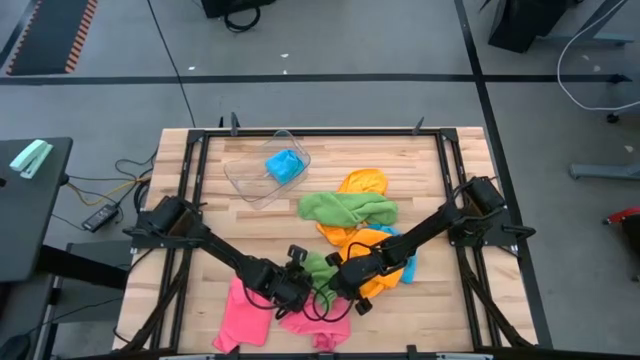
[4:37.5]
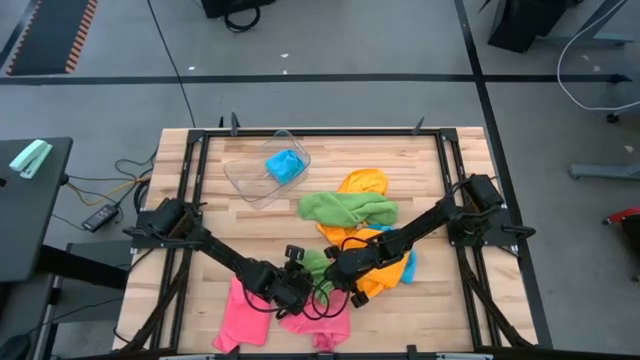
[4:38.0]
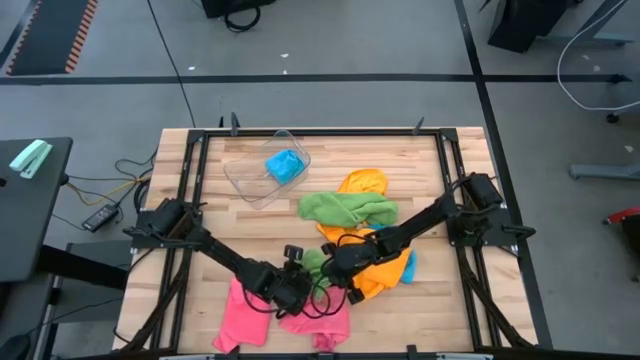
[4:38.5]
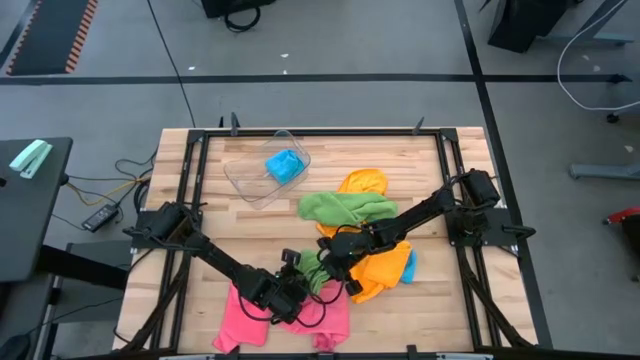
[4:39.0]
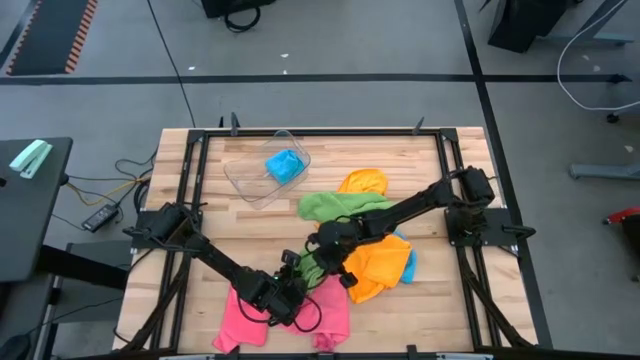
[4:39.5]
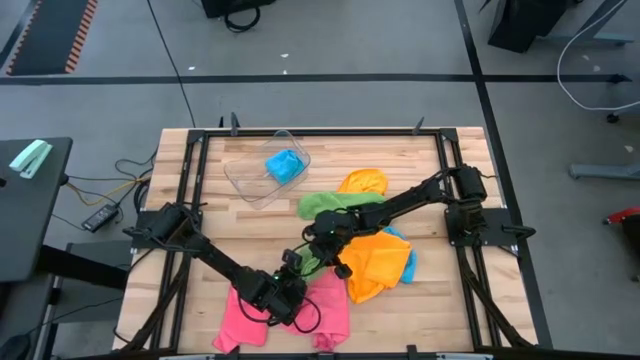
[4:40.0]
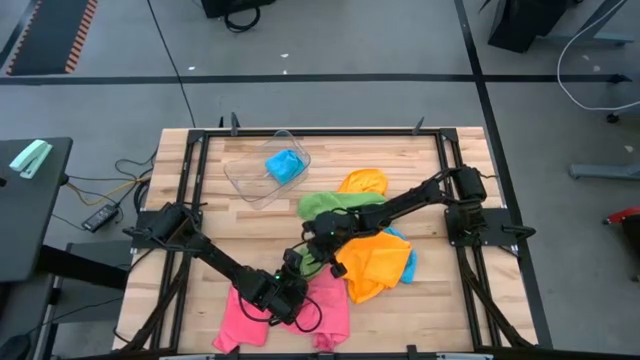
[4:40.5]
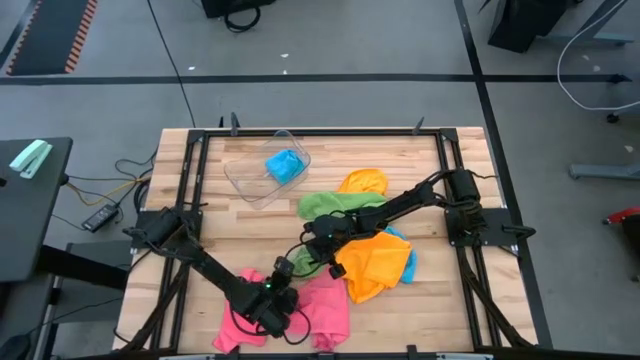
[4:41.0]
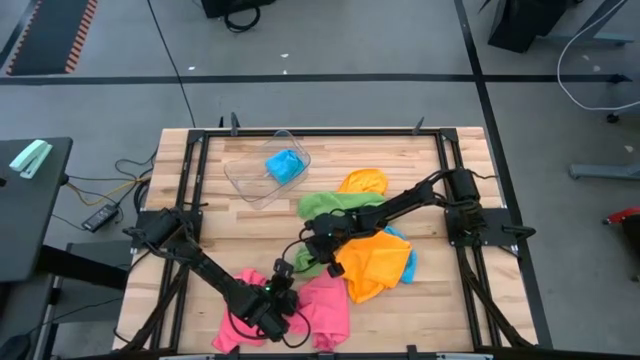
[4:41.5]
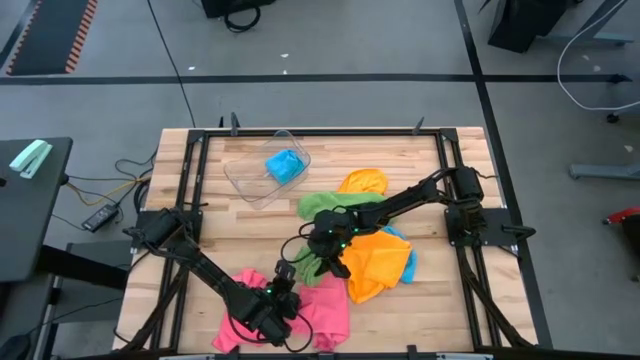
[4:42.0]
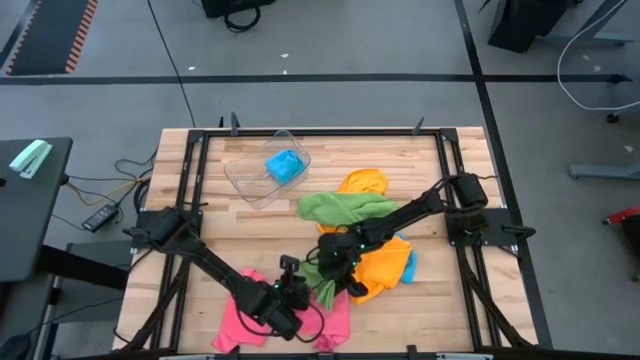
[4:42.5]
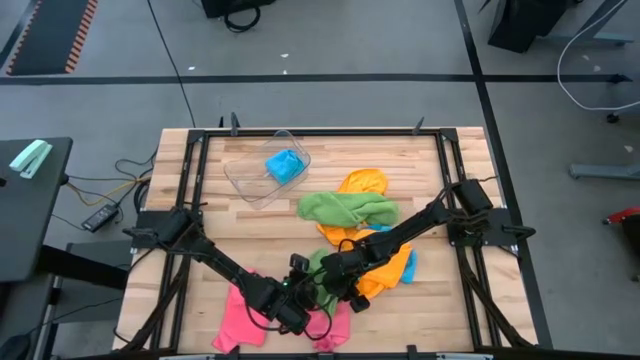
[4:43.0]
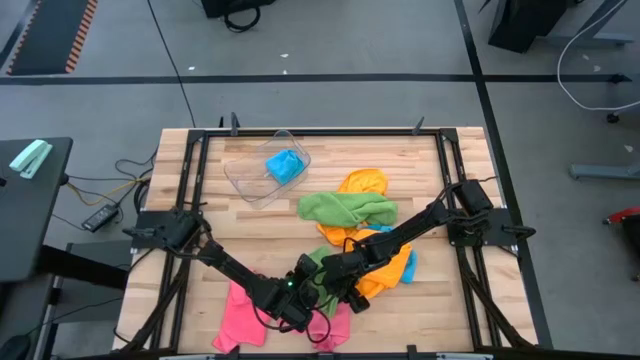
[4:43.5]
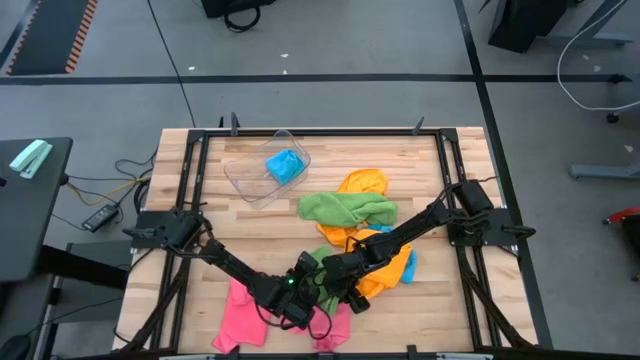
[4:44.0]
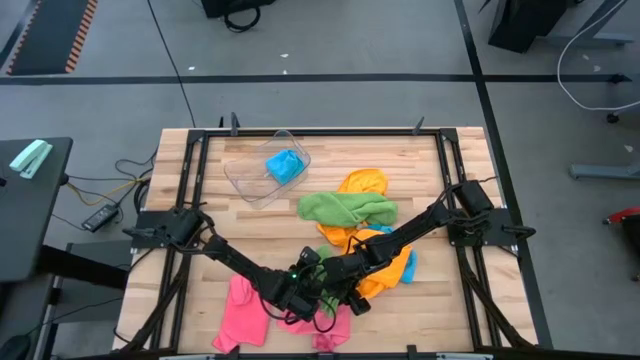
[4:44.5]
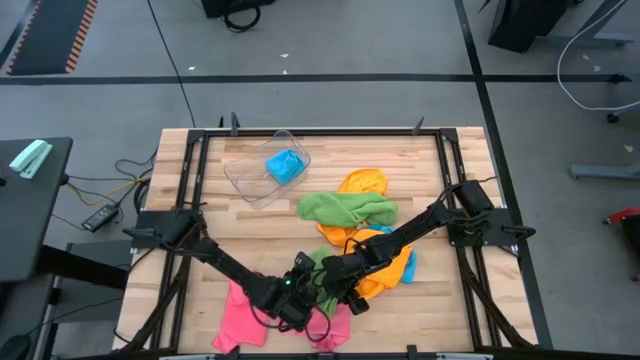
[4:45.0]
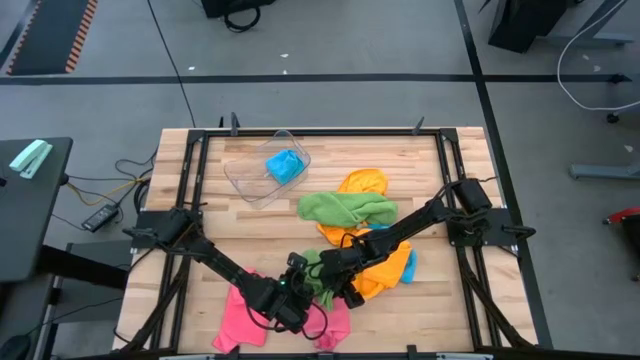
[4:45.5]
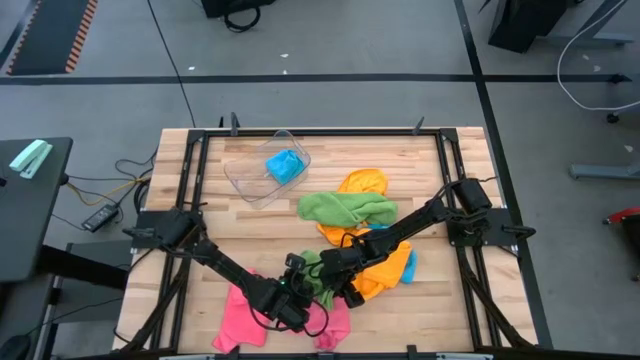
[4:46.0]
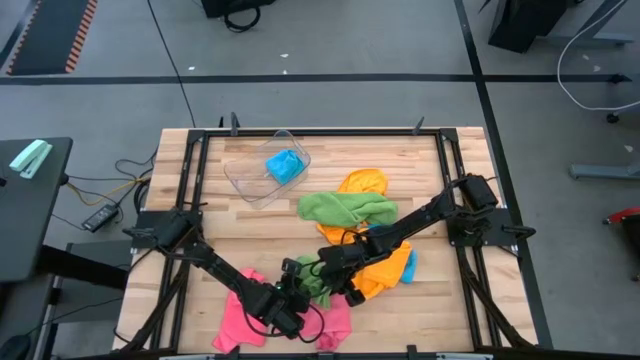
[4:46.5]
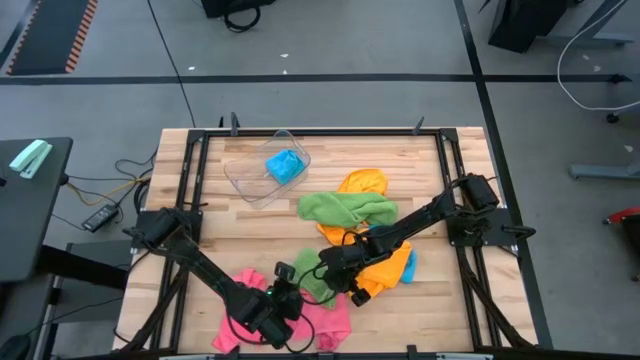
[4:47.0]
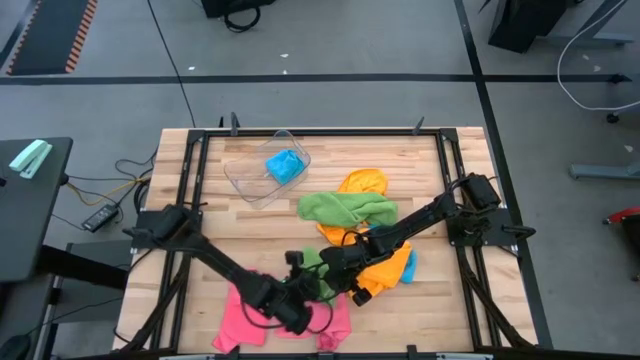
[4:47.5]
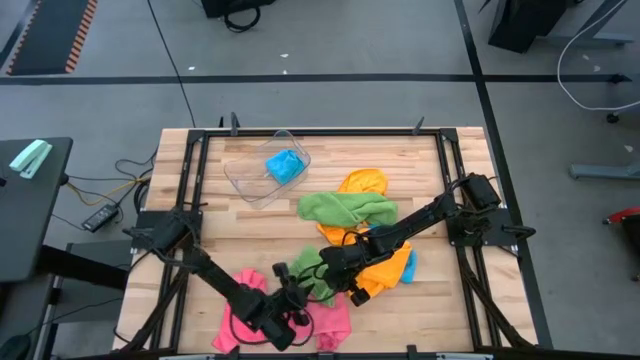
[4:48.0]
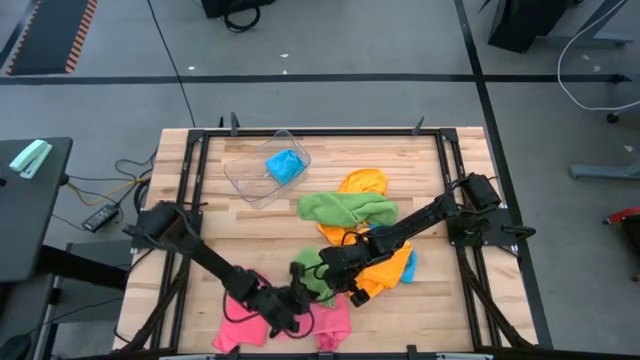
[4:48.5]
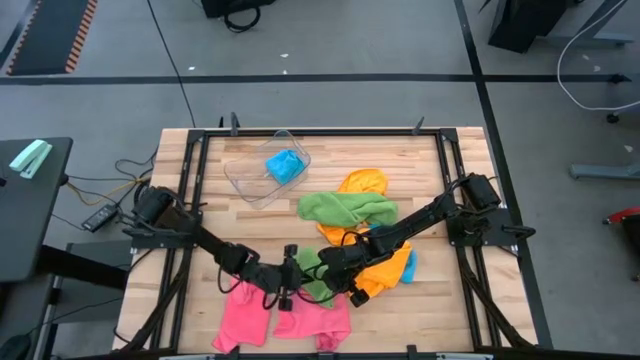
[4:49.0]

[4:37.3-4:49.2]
Task: Fold microfiber towels
Fold the left green microfiber towel

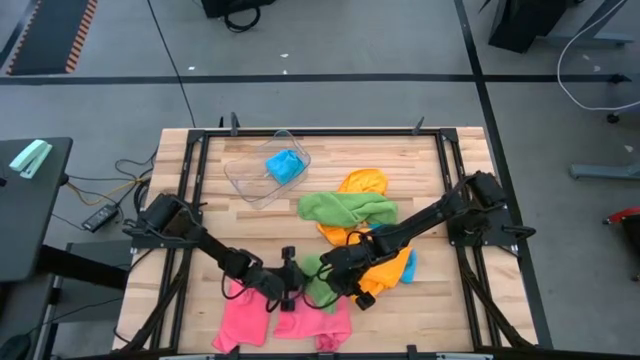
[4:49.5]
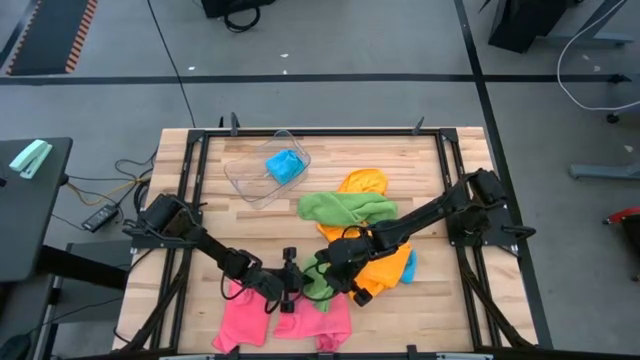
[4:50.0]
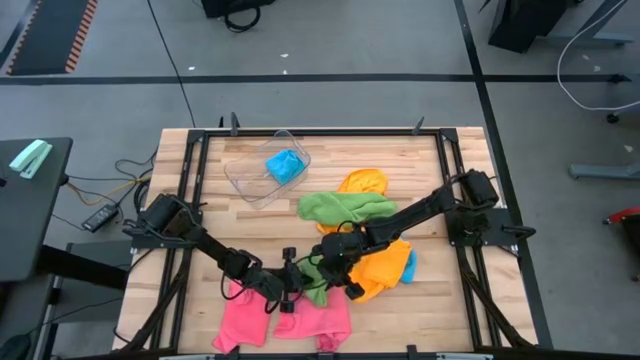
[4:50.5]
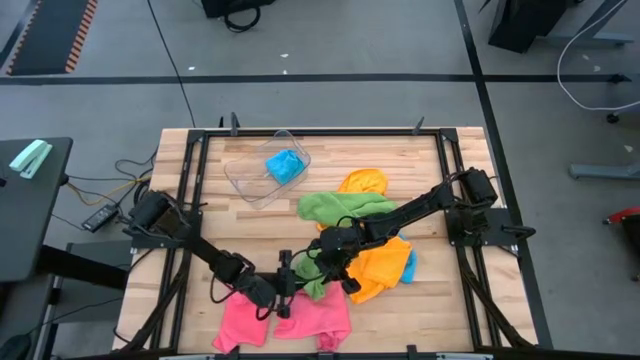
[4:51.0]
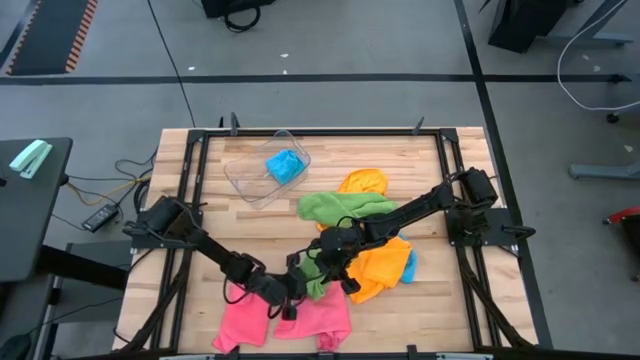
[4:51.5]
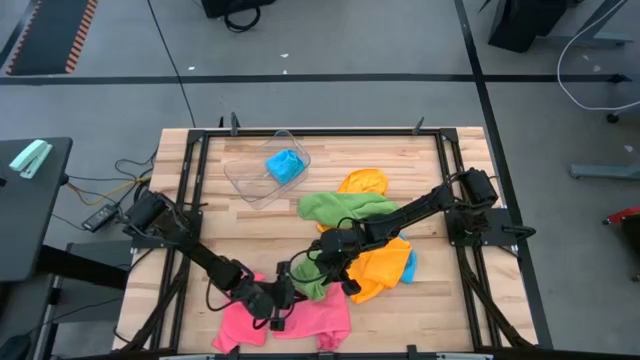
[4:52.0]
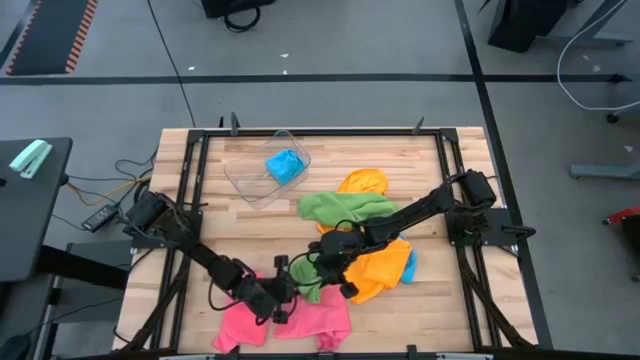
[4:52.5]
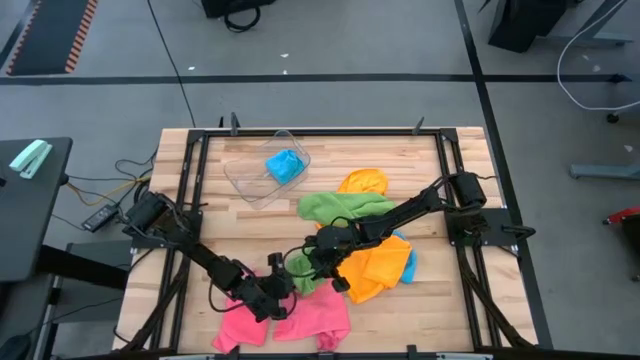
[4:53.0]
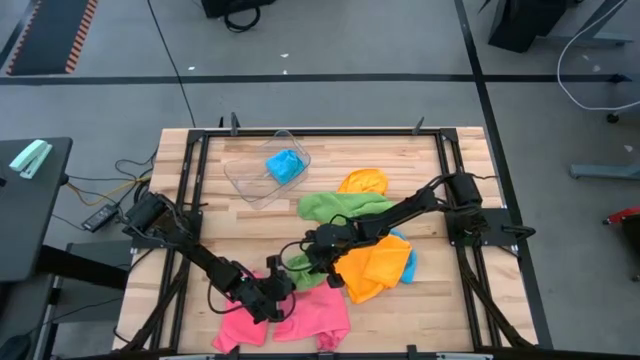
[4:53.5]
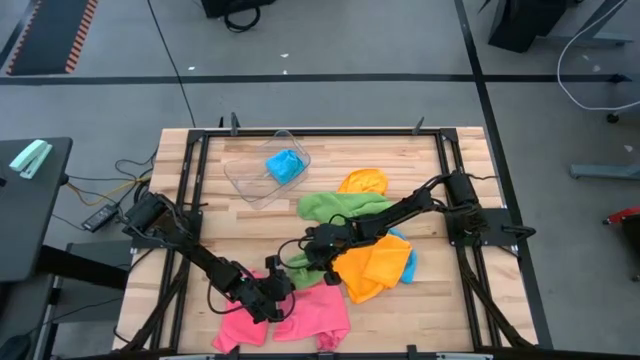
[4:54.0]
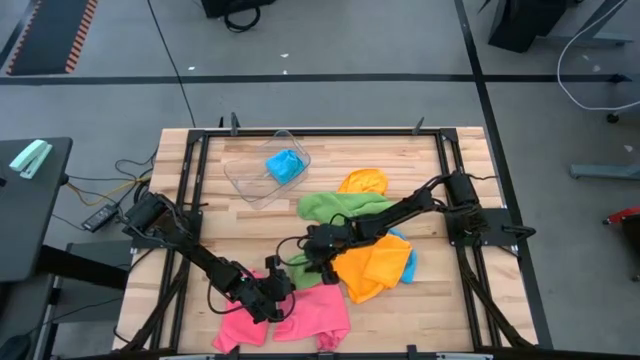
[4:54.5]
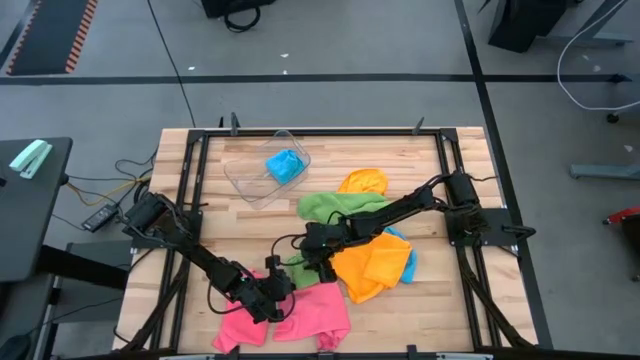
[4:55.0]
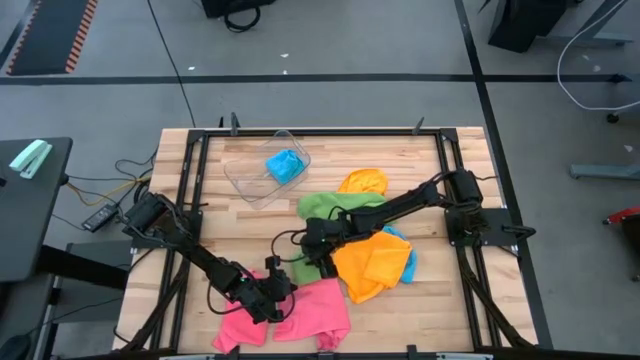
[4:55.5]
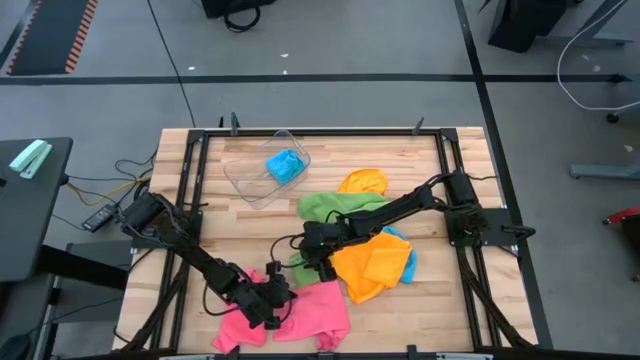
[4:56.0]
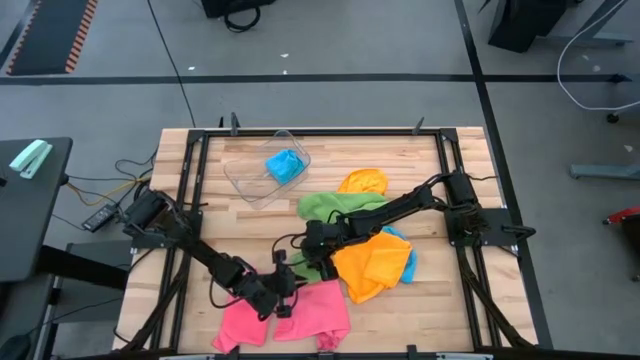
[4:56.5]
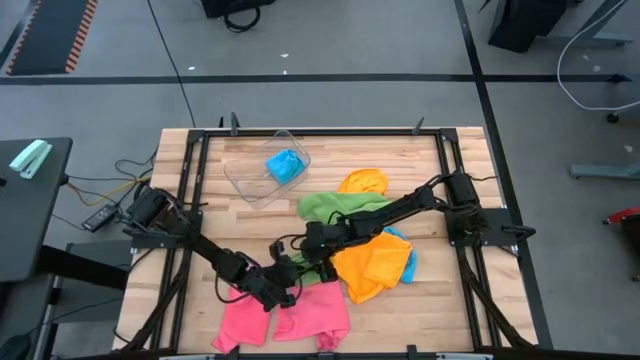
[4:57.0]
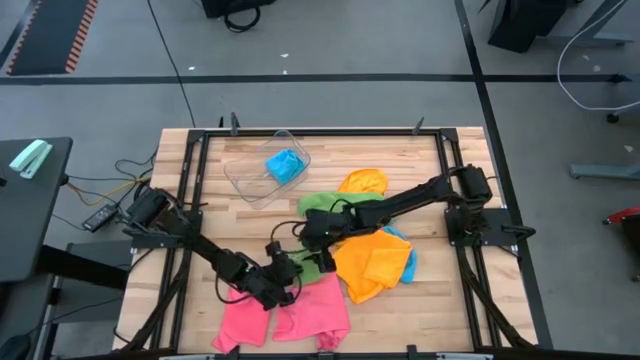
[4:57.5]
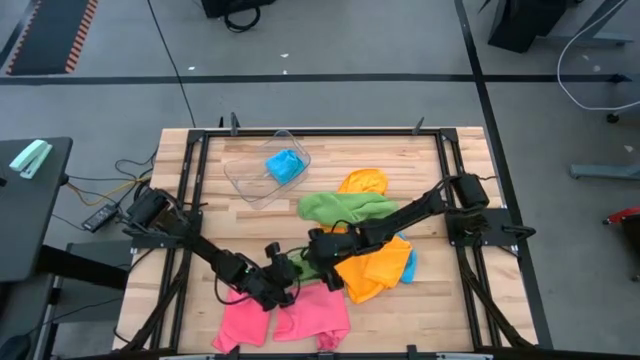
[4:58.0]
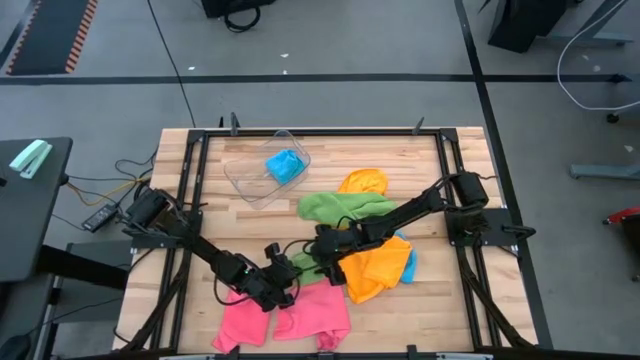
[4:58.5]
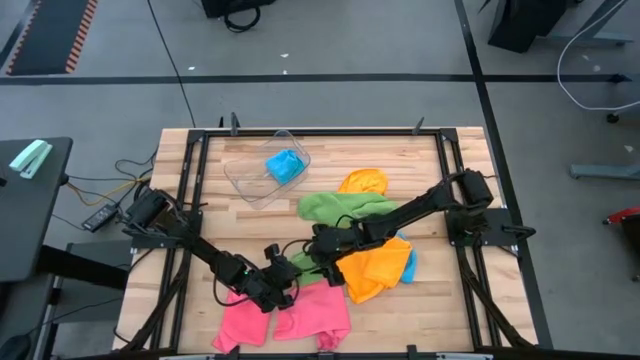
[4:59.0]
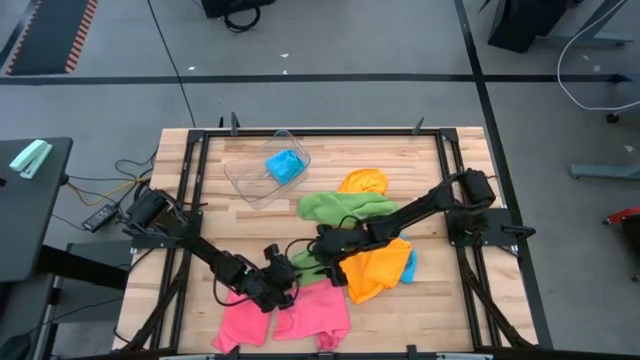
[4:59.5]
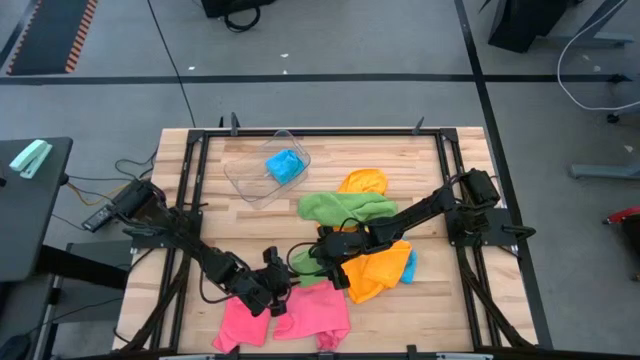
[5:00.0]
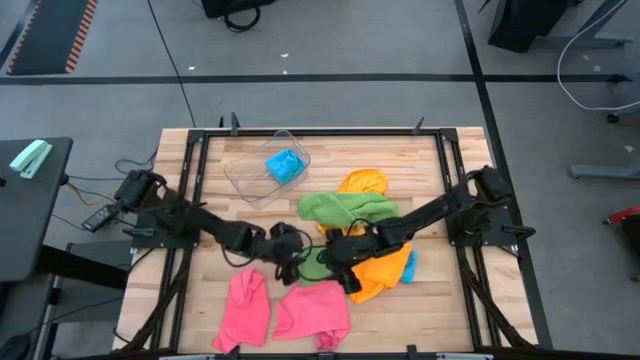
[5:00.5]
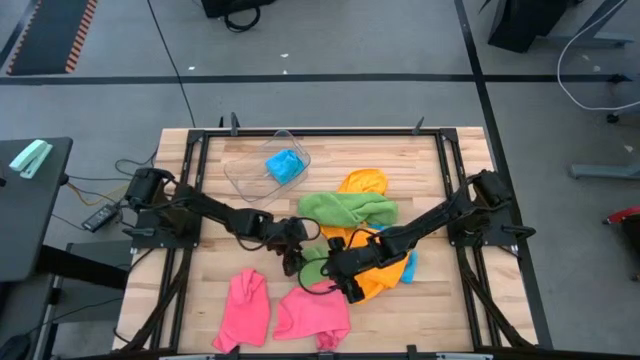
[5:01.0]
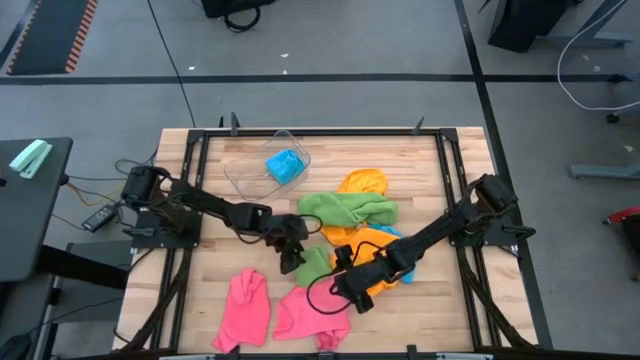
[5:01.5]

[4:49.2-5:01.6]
Fold the left green microfiber towel
